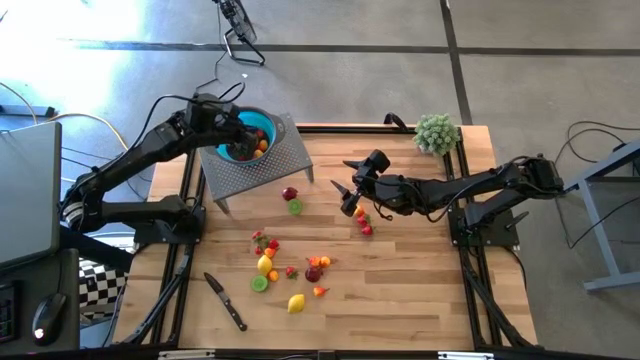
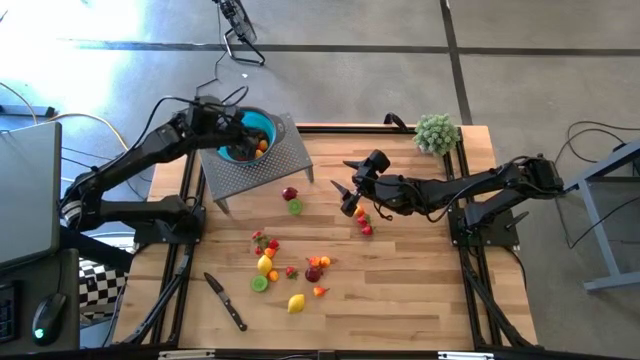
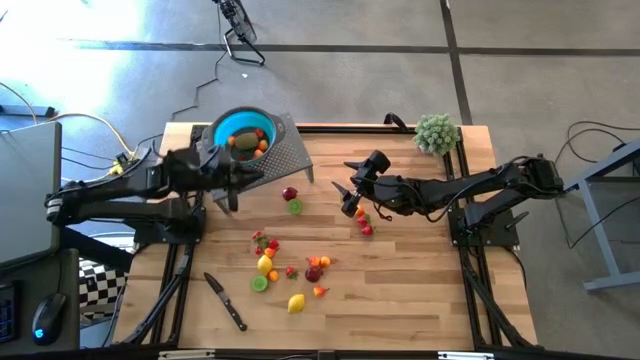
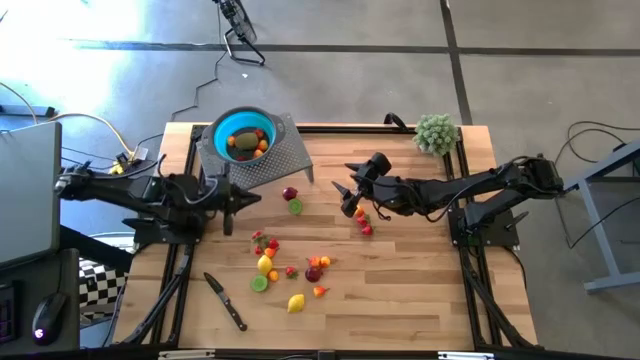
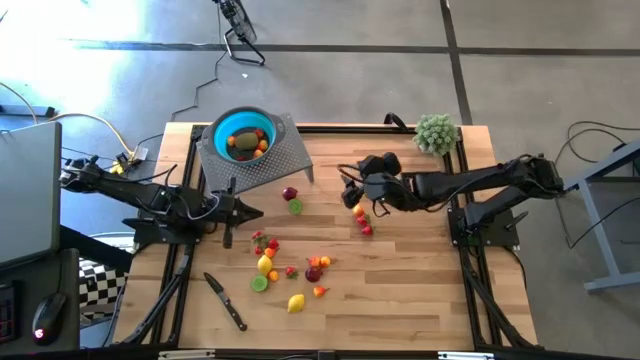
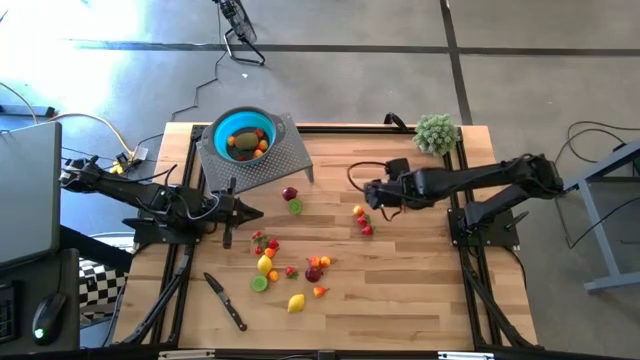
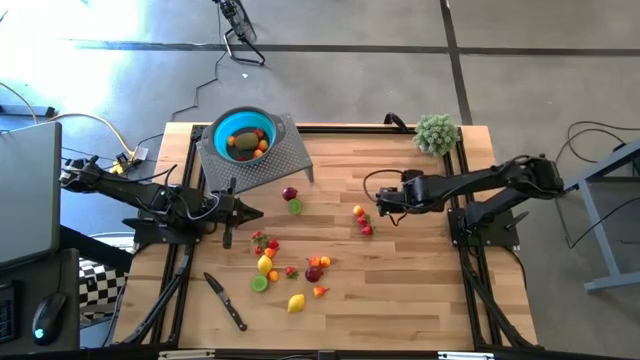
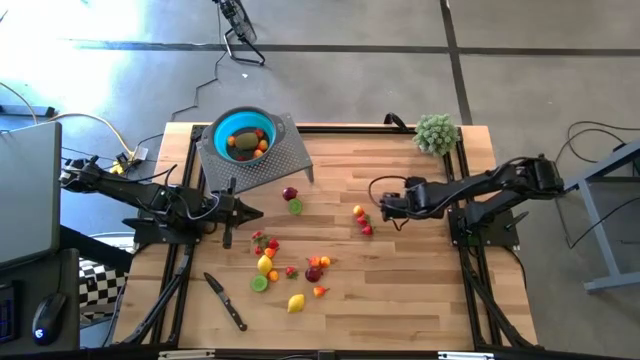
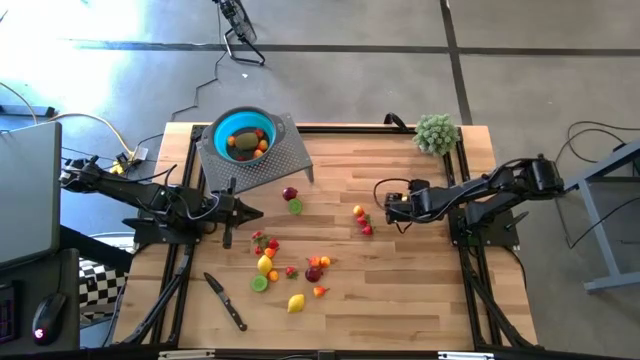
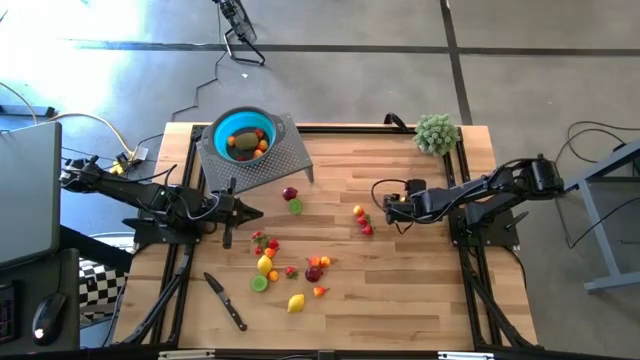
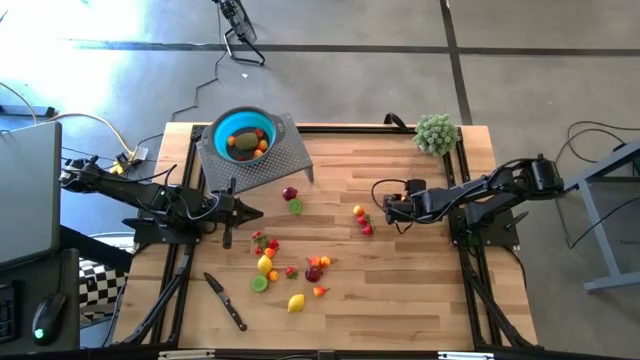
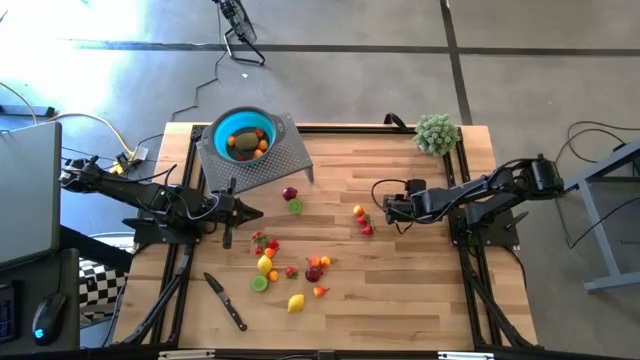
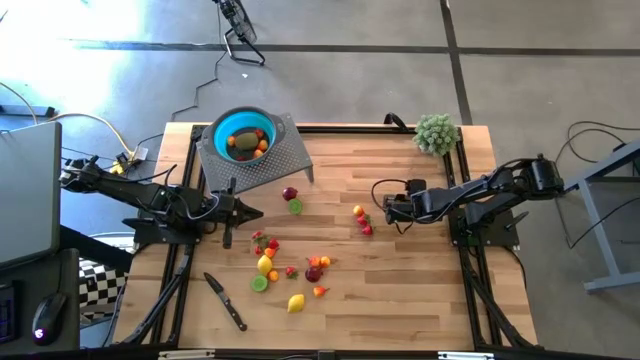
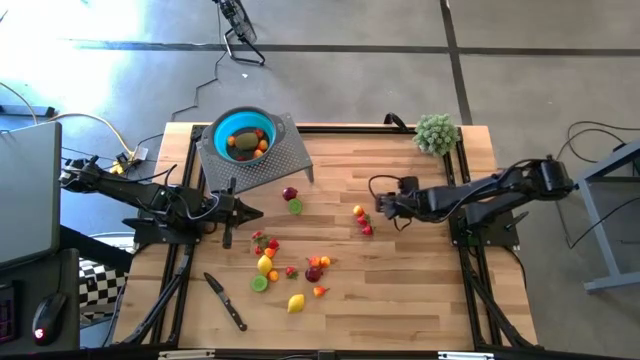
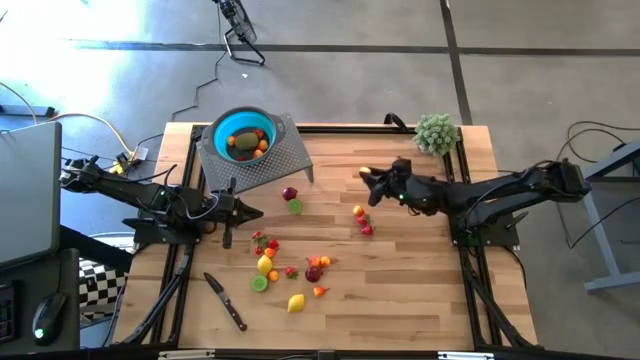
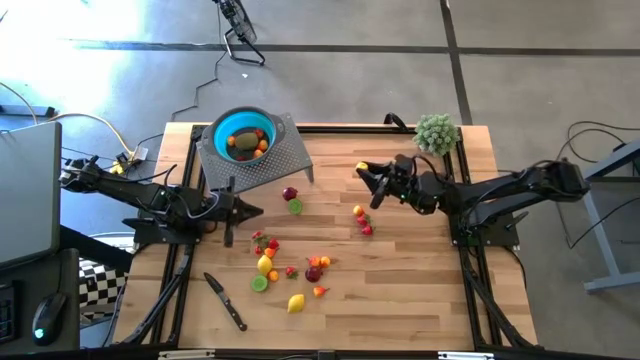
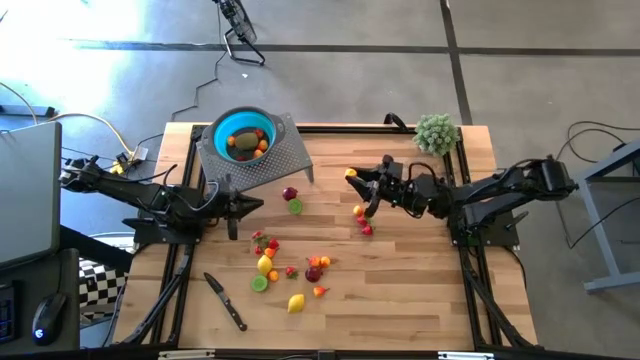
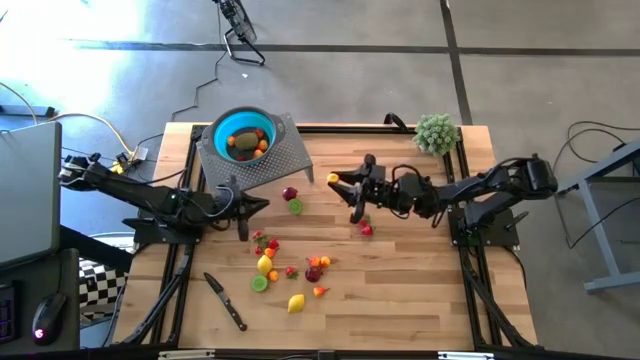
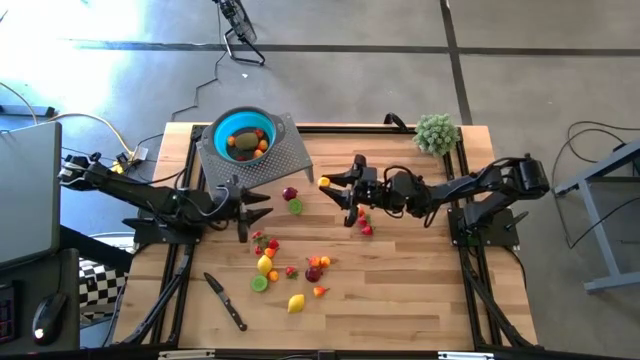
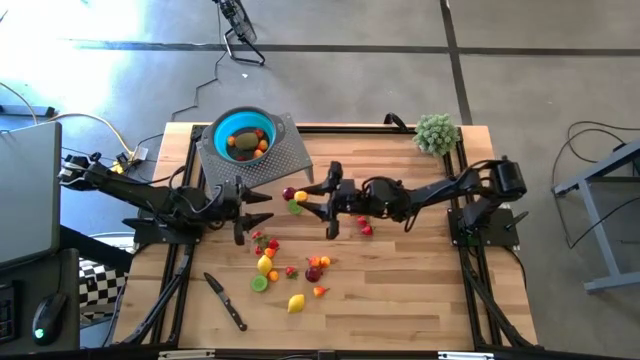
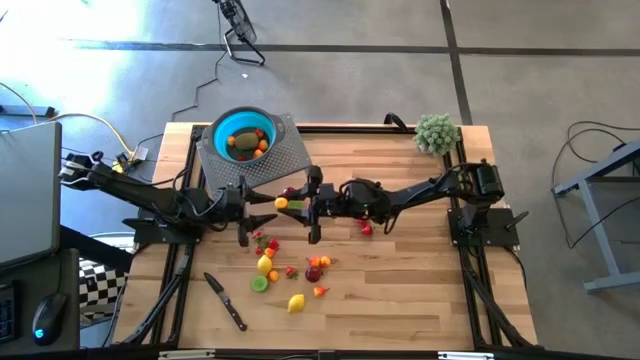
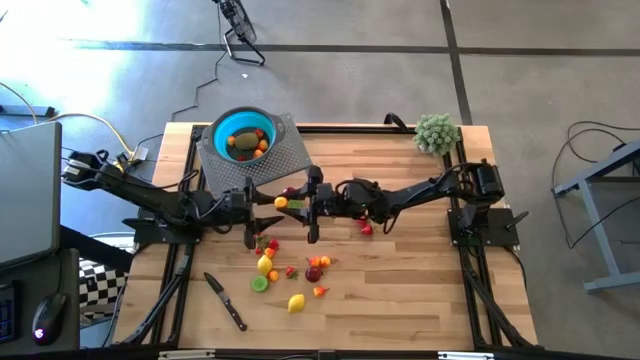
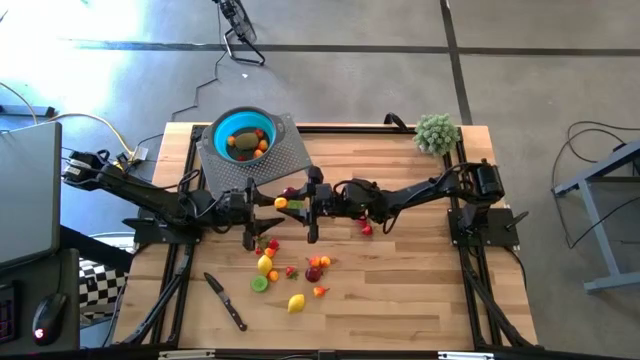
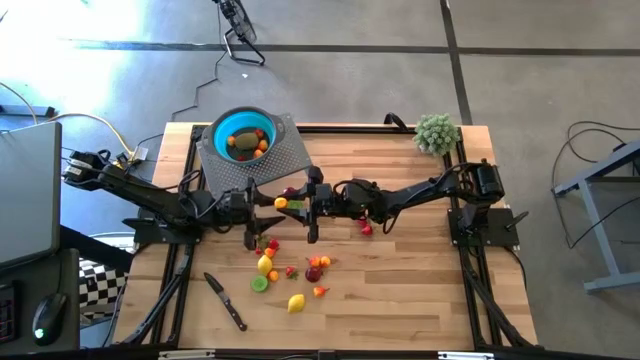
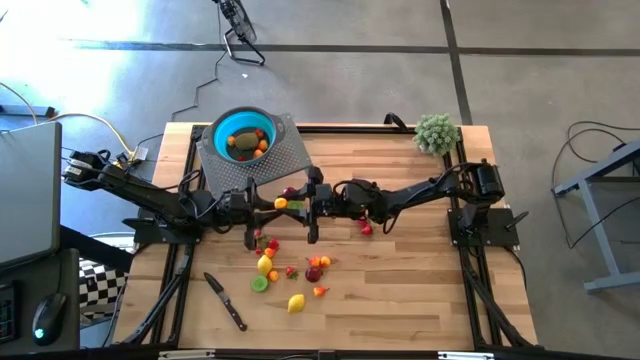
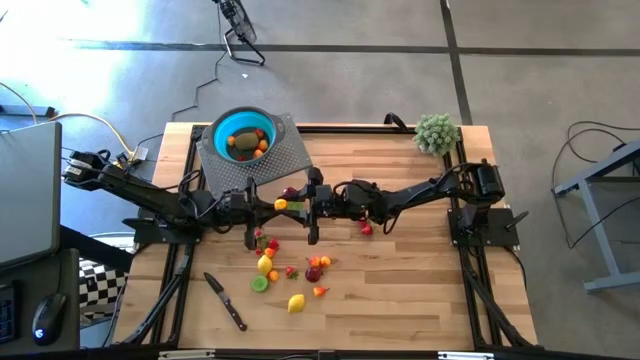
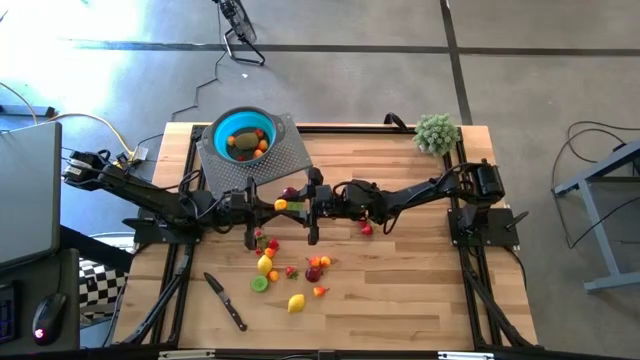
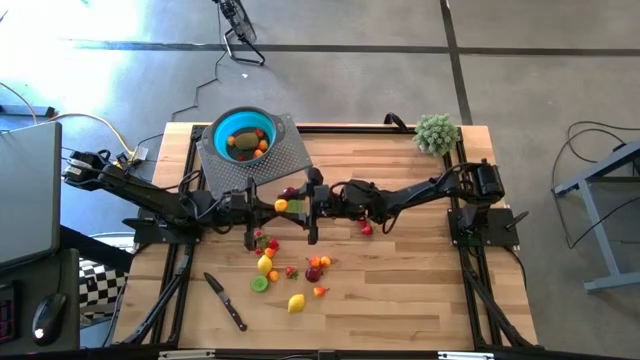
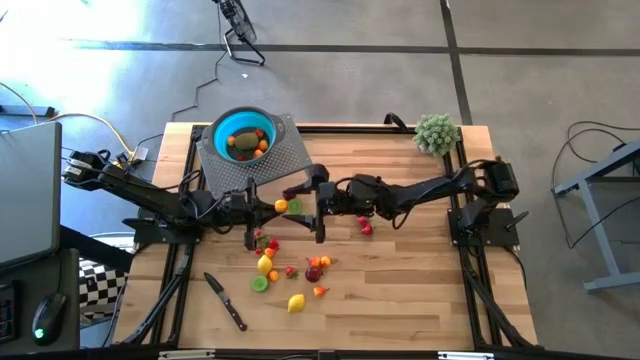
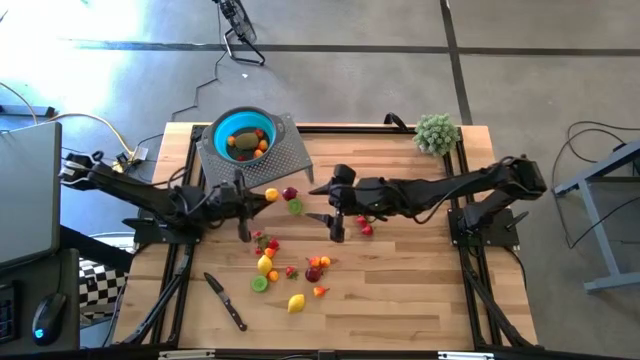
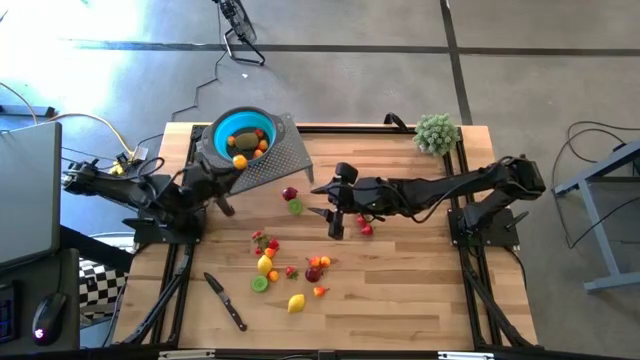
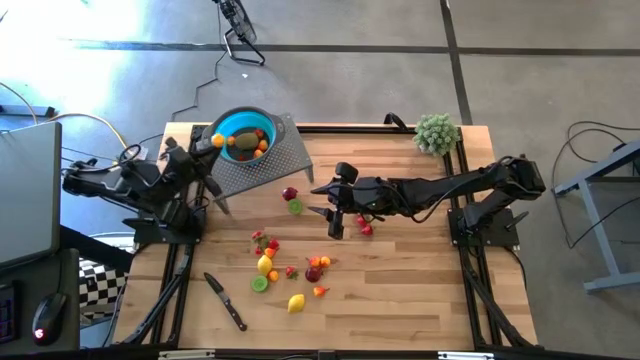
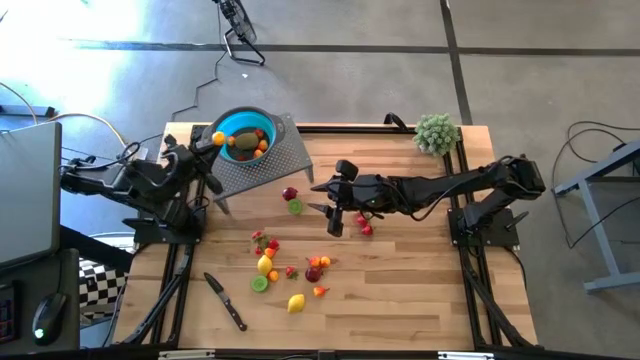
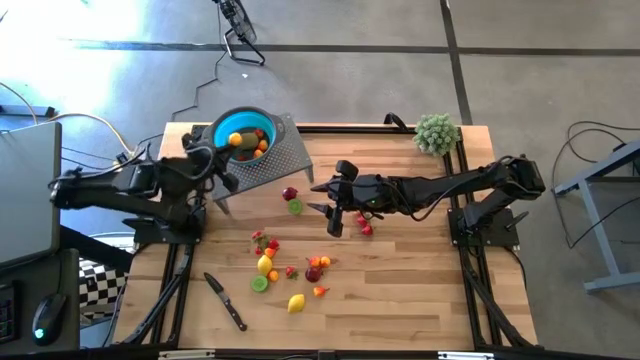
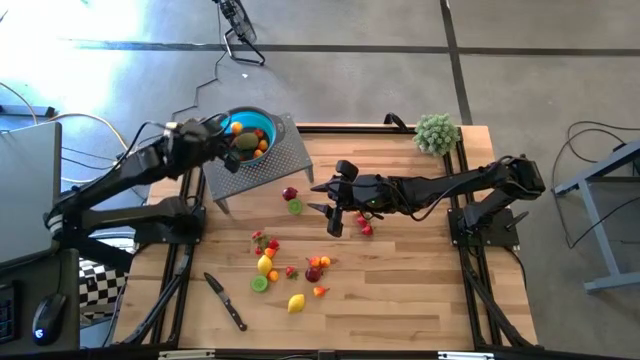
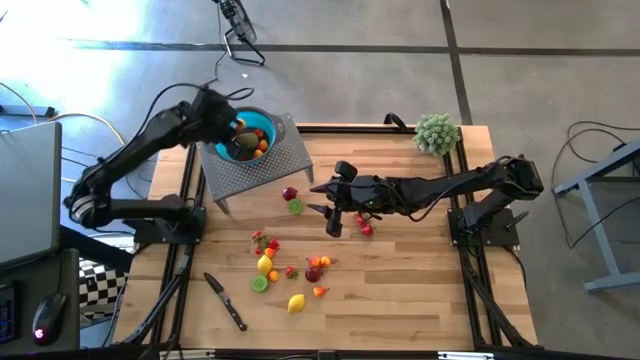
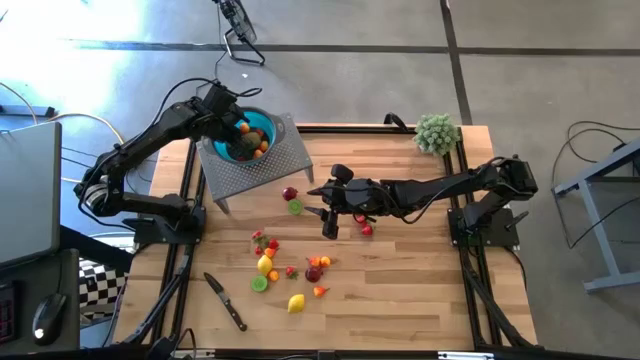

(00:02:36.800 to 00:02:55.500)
Task: Pick & Place Fruit
Put the orange pear into the blue strainer bowl on the shelf

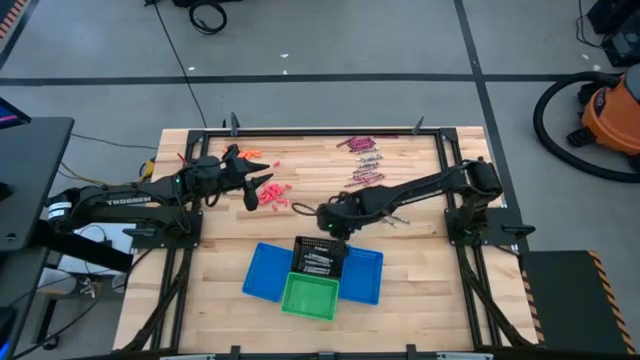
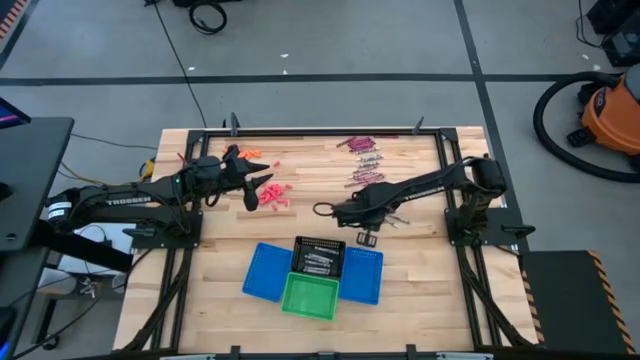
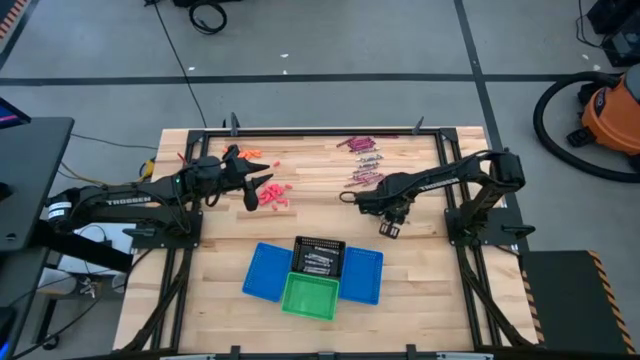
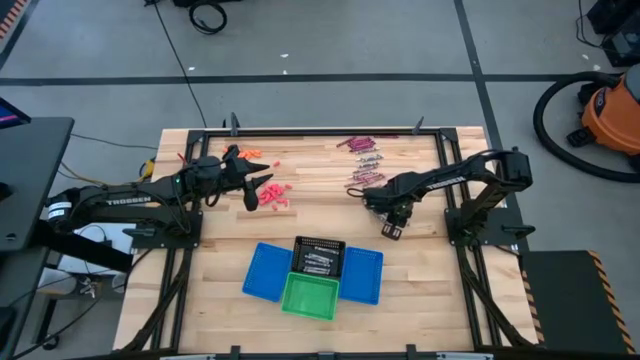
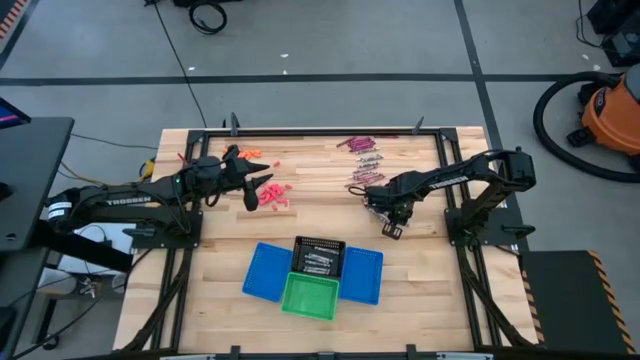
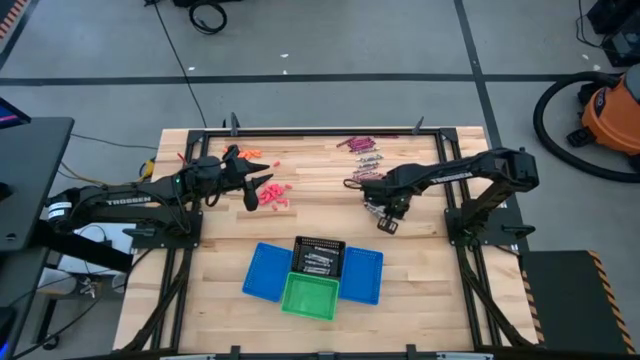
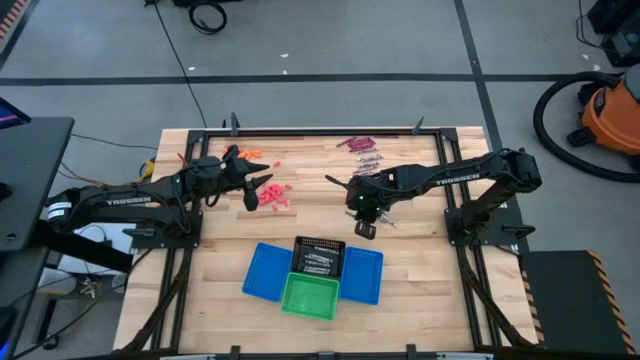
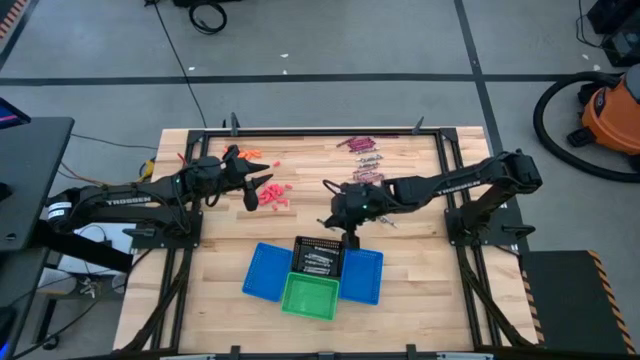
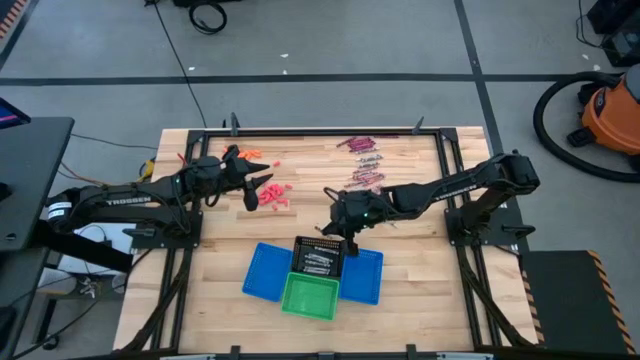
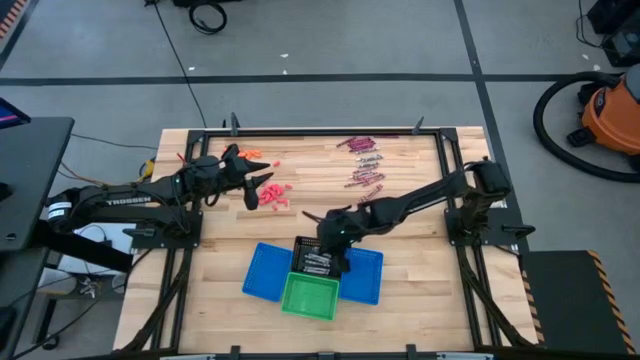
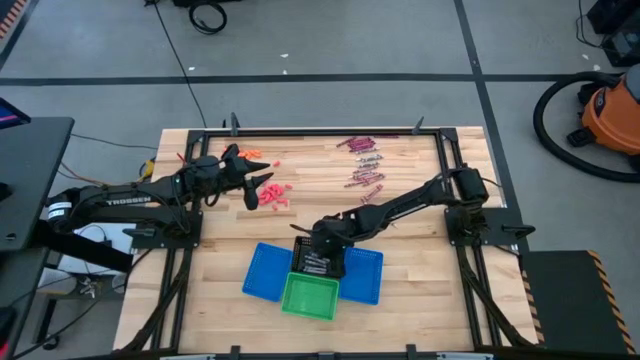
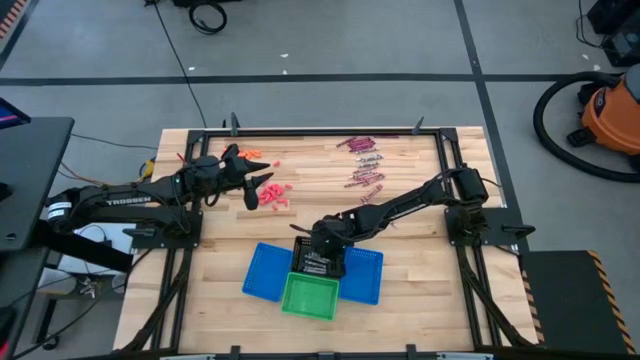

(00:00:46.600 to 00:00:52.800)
Task: Sort crayons
Put the black crayon into the black bin
